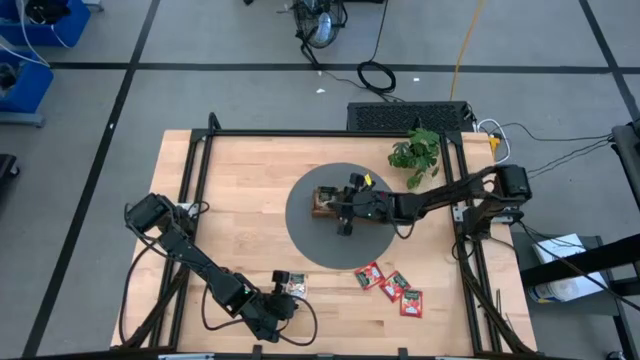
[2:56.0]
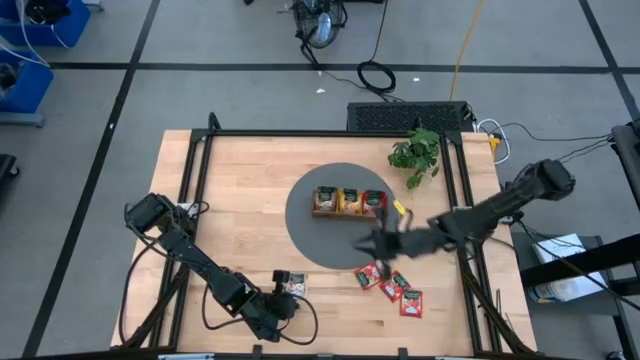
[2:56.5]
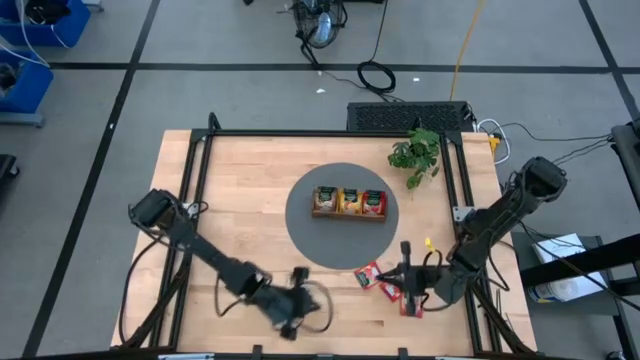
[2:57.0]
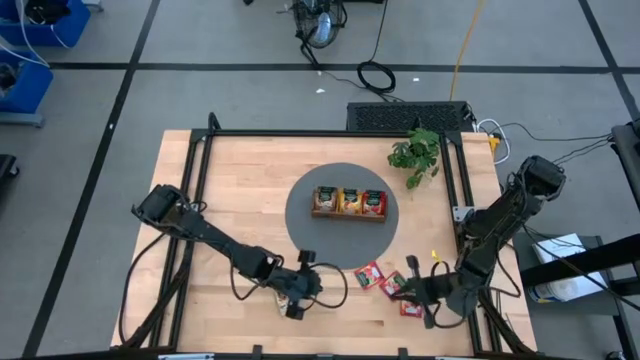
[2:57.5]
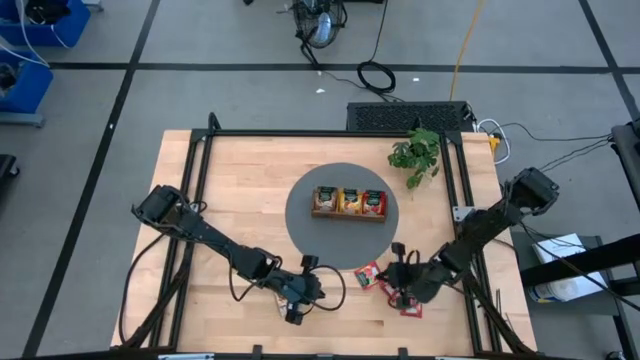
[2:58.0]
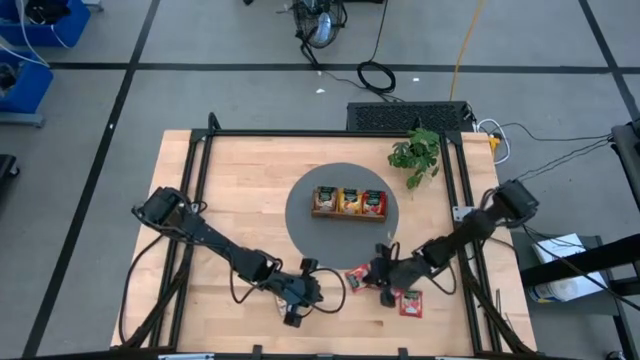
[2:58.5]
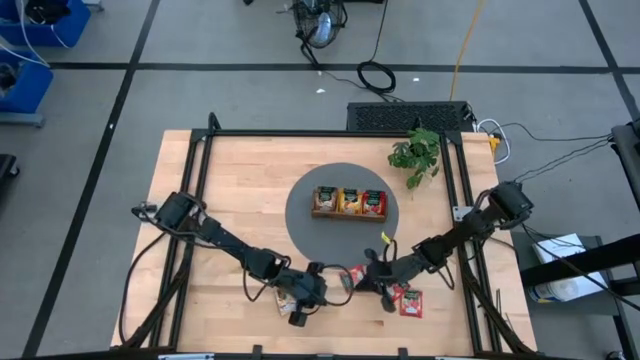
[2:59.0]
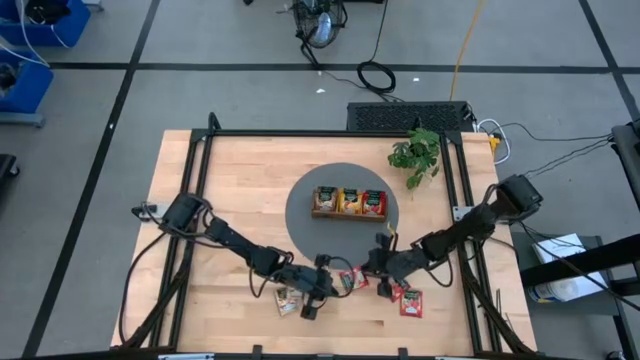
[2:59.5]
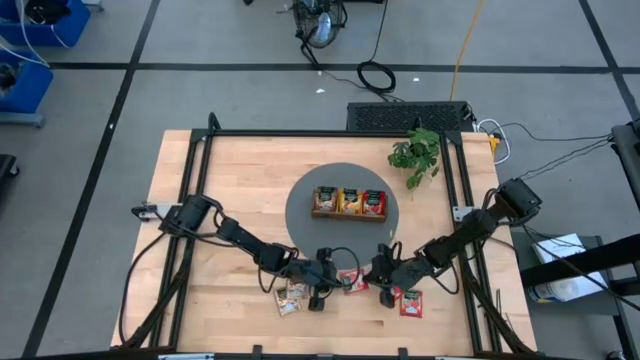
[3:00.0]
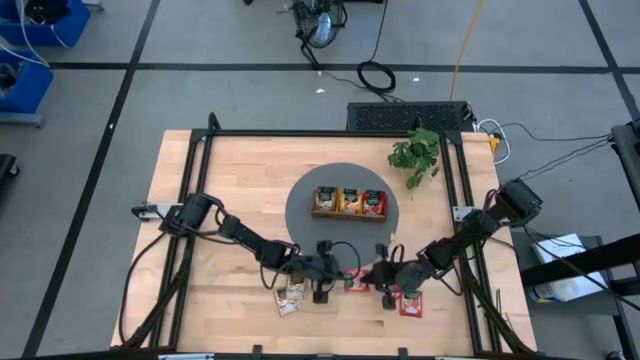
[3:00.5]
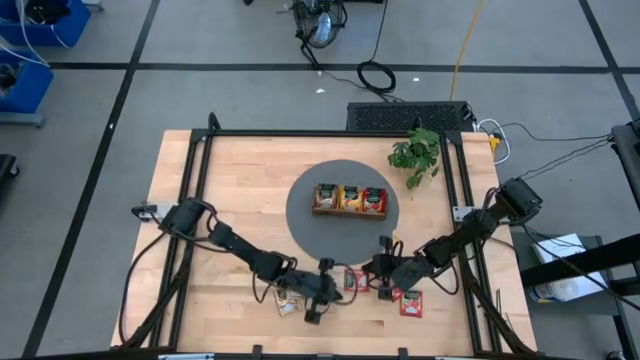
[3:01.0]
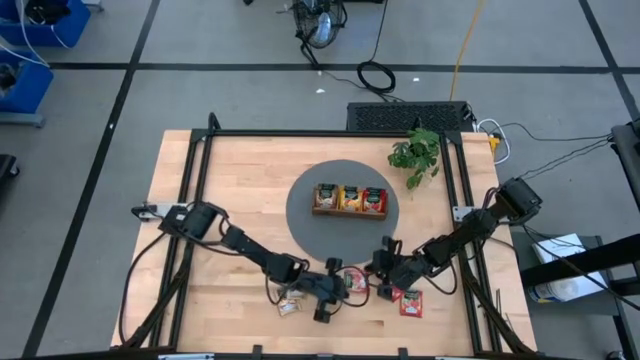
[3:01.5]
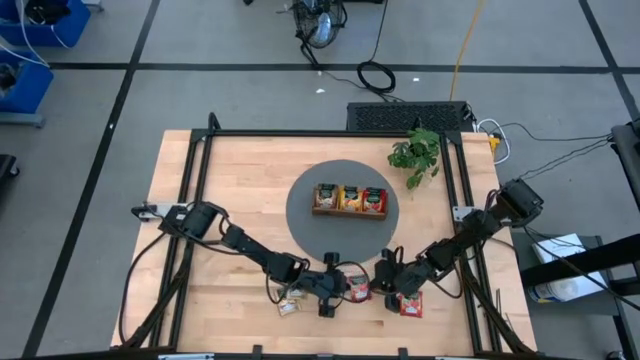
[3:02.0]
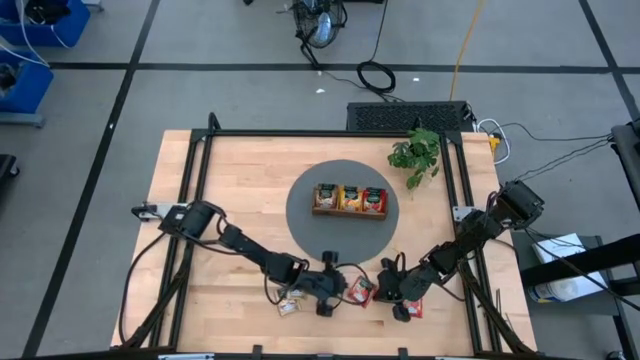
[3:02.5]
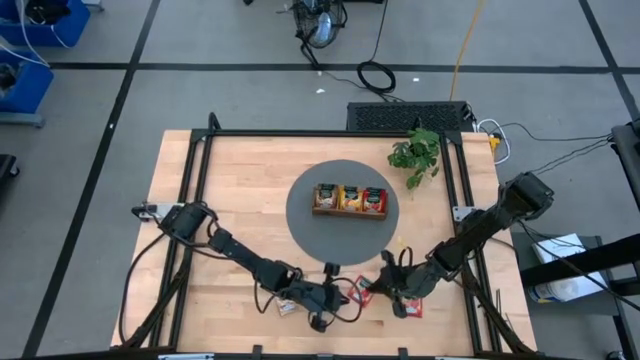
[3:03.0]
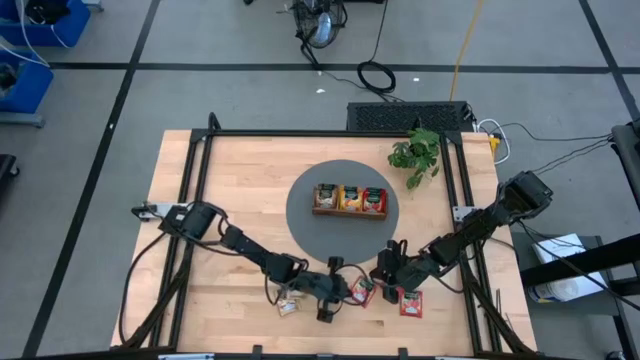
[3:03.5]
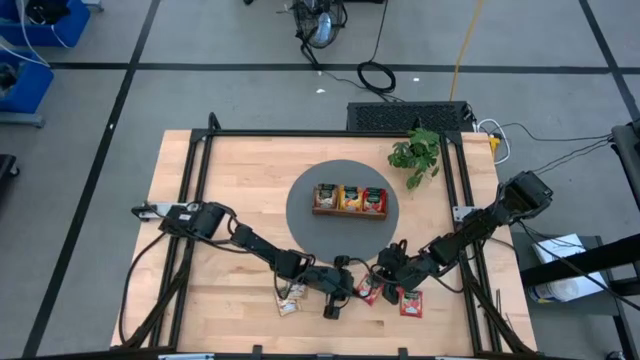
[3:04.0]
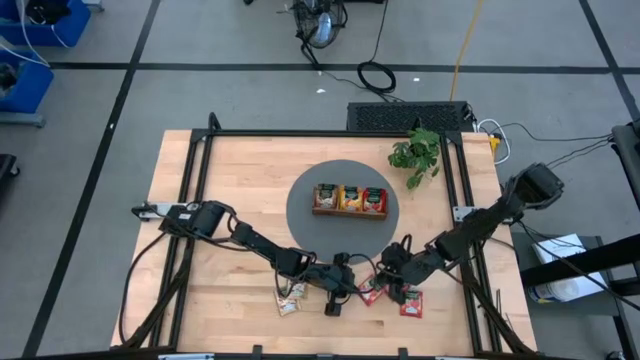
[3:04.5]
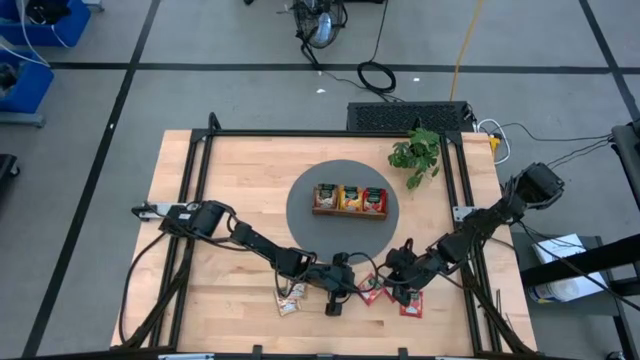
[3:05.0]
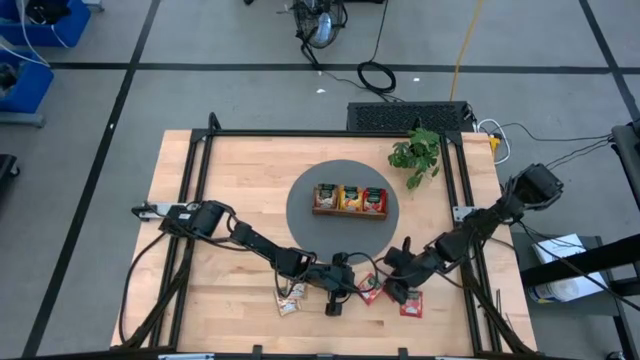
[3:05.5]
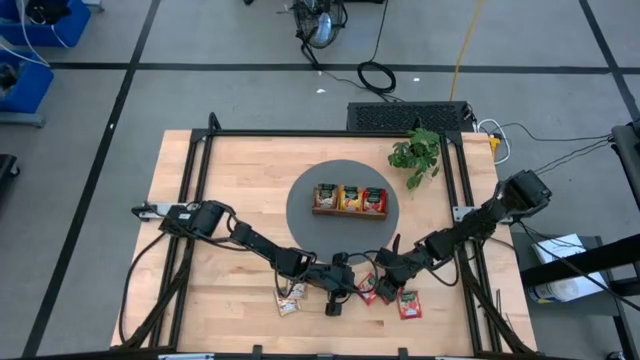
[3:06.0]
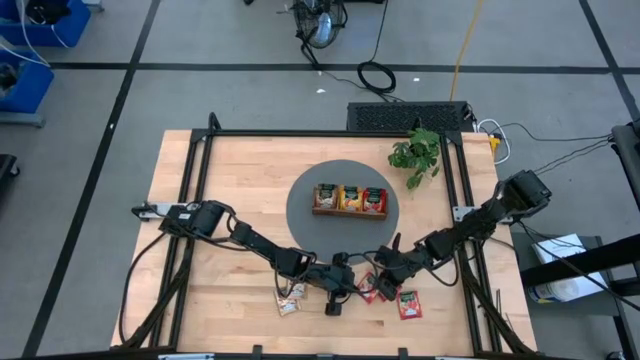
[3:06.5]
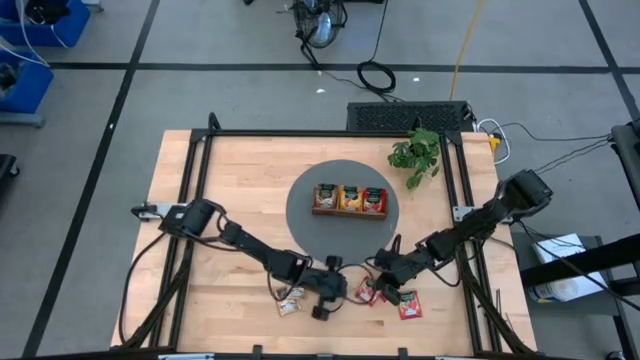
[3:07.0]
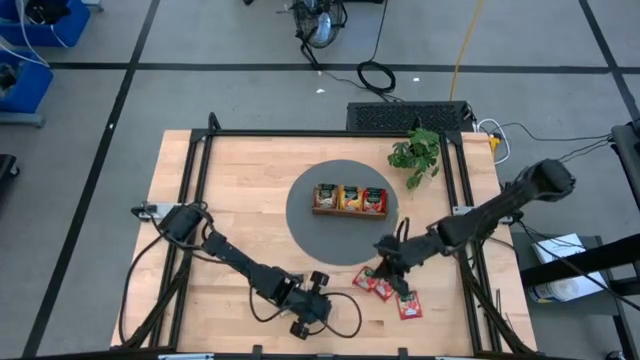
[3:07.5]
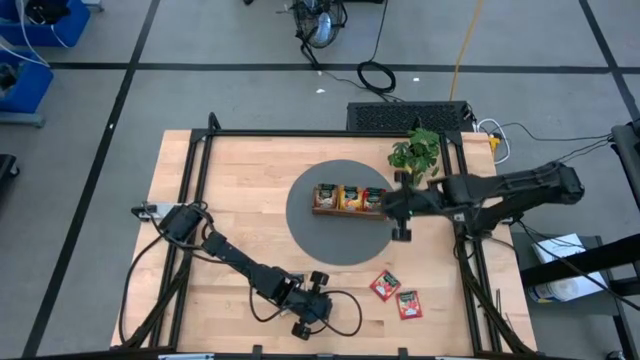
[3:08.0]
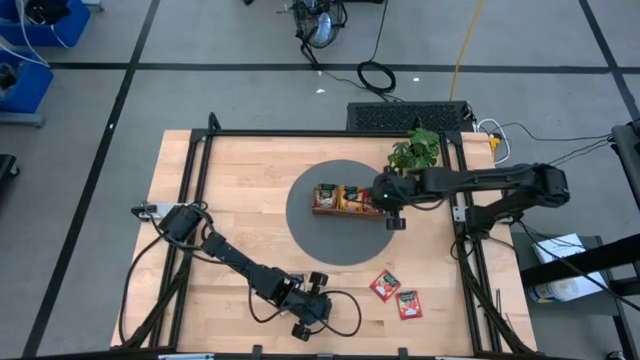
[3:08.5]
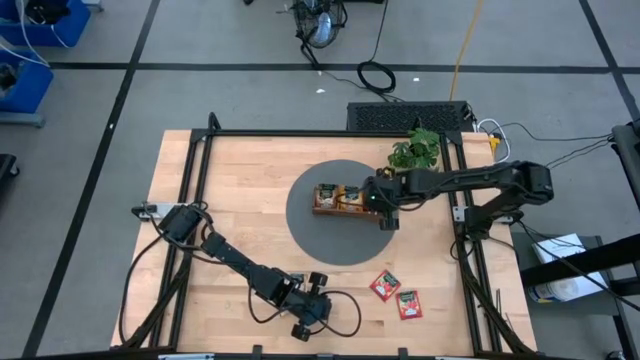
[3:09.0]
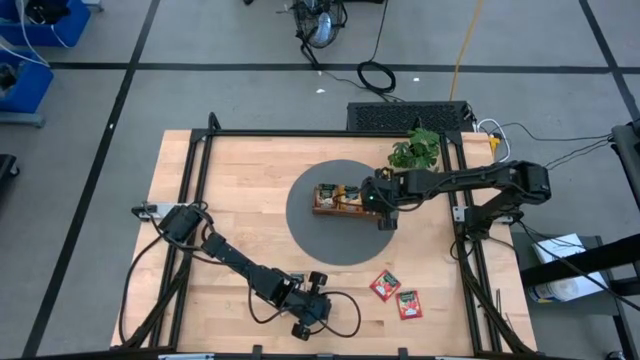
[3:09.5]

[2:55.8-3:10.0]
Task: Pick & Place Tea
Put the red tea bag to the right section into the wooden organizer

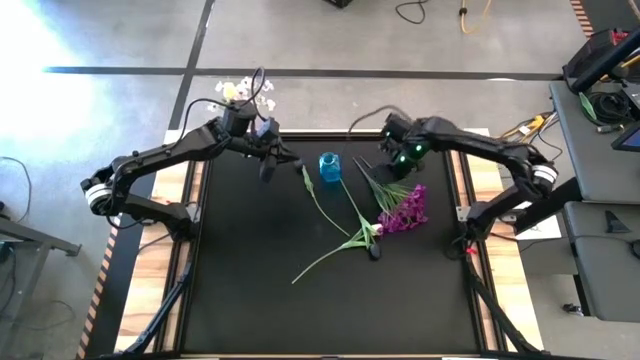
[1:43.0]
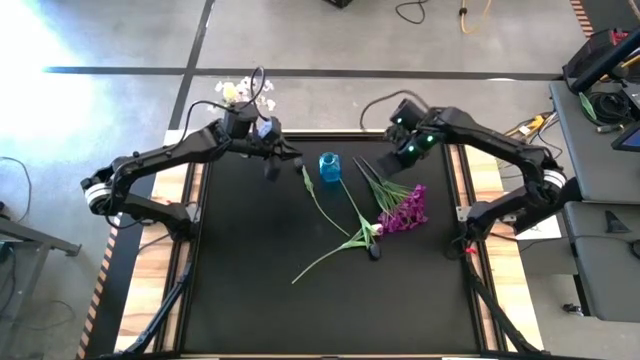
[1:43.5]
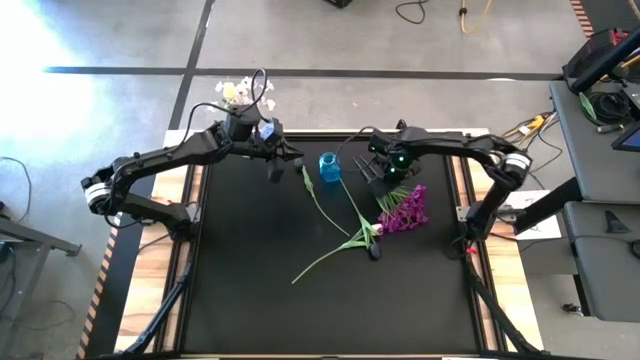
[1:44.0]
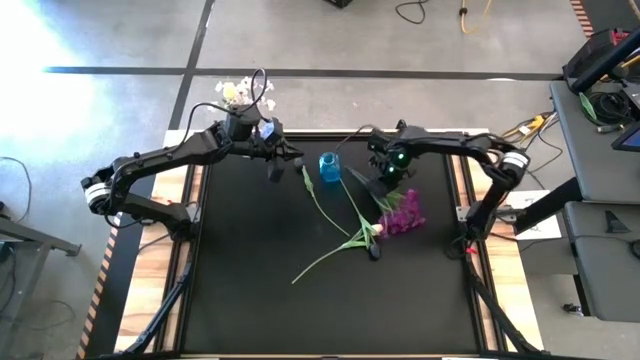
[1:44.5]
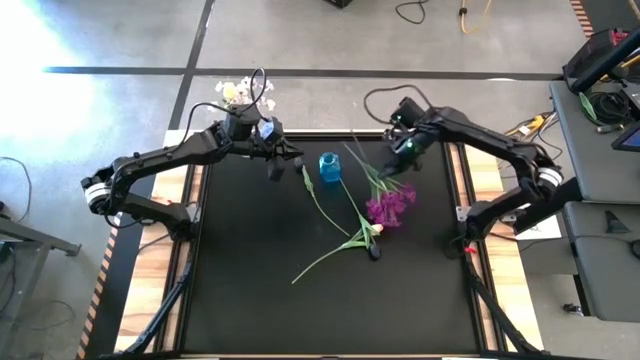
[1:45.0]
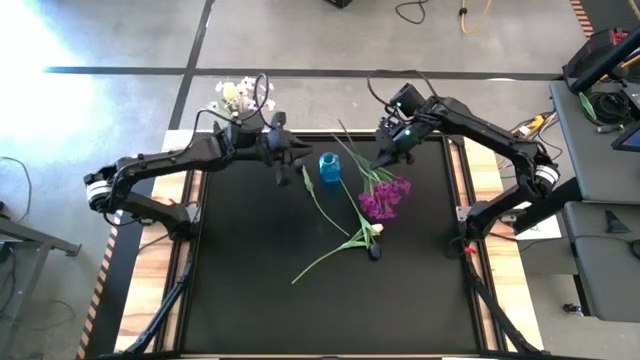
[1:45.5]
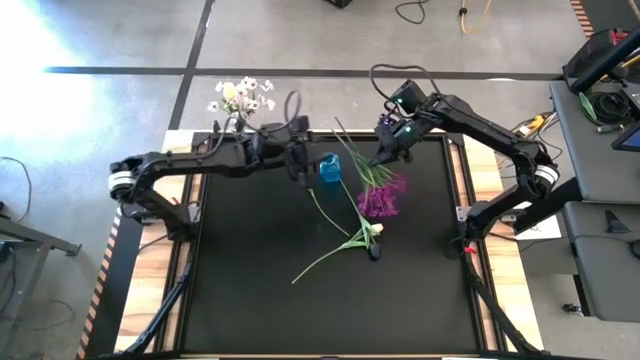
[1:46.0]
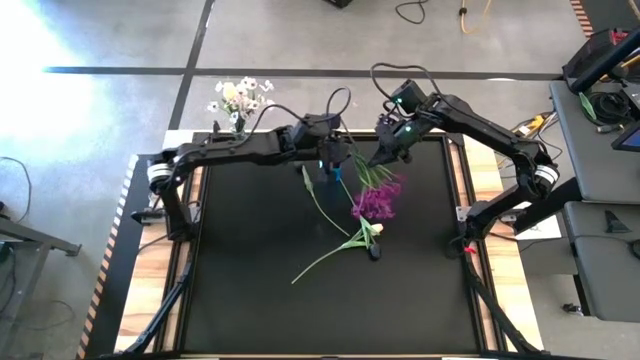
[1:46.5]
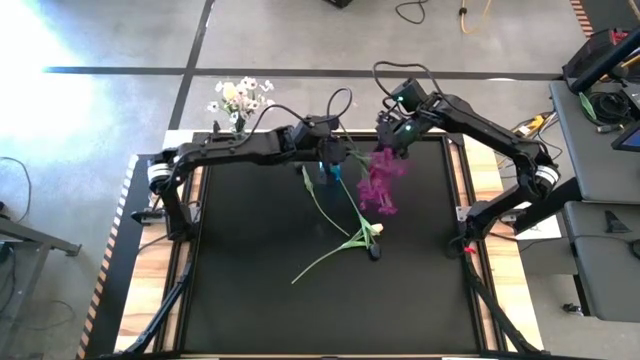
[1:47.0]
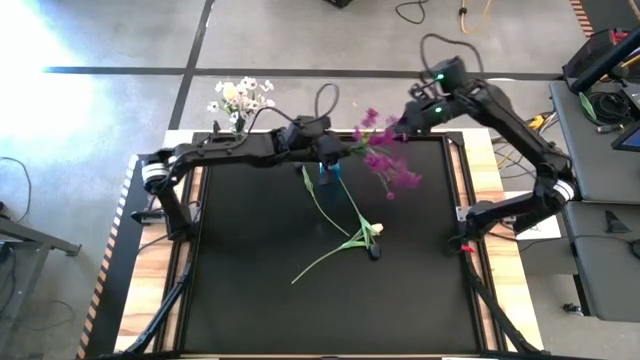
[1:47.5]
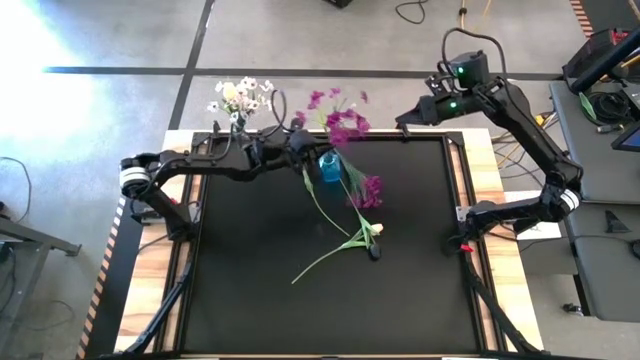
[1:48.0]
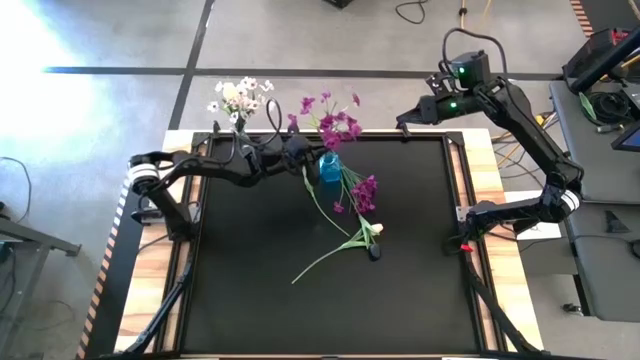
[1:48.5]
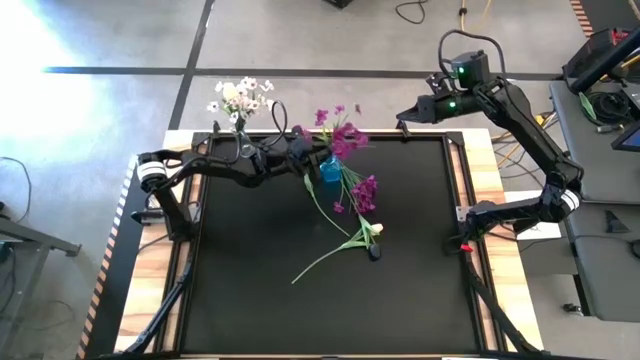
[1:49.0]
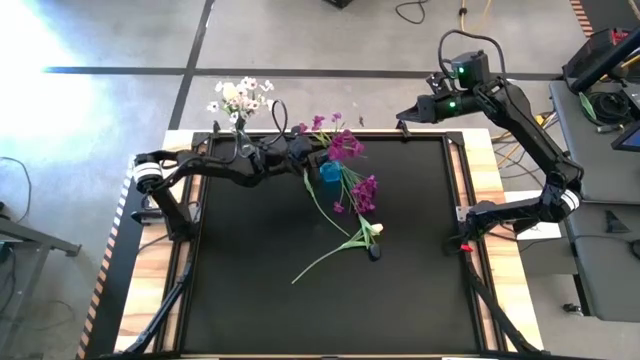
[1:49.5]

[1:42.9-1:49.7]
Task: Sort flowers into vase by color
Put the bottom violet flowers into the blue vase
